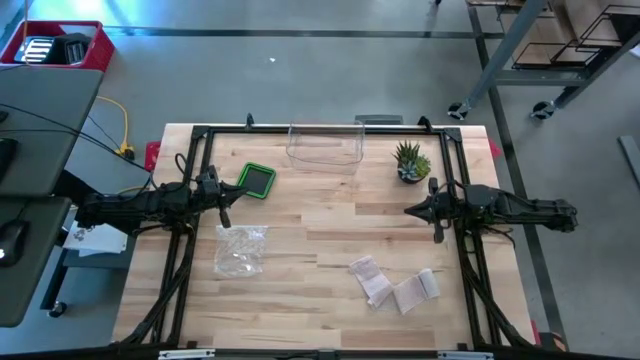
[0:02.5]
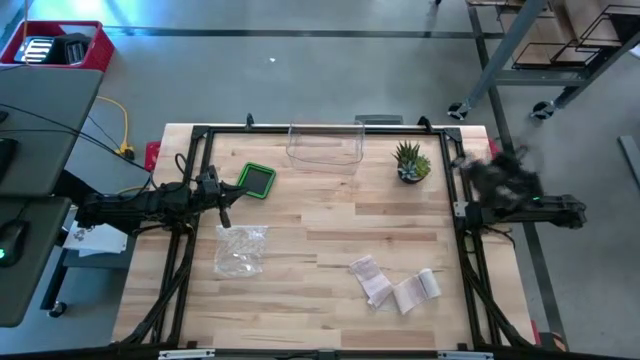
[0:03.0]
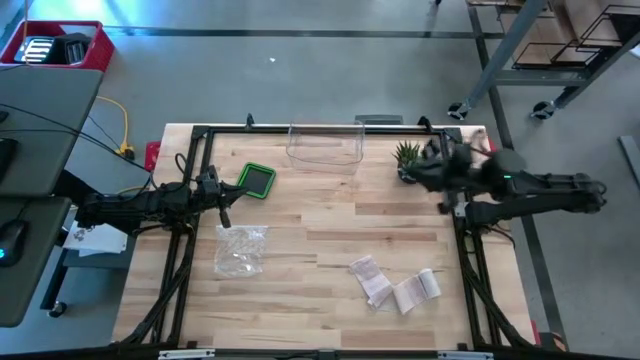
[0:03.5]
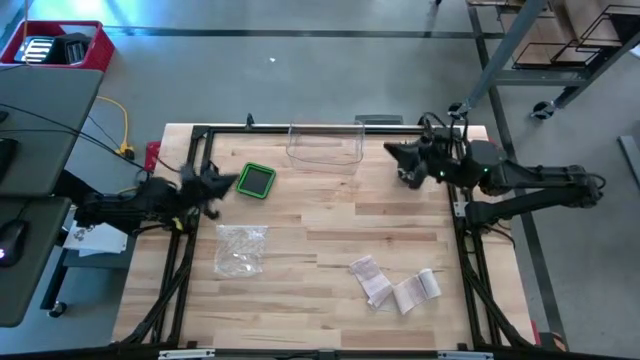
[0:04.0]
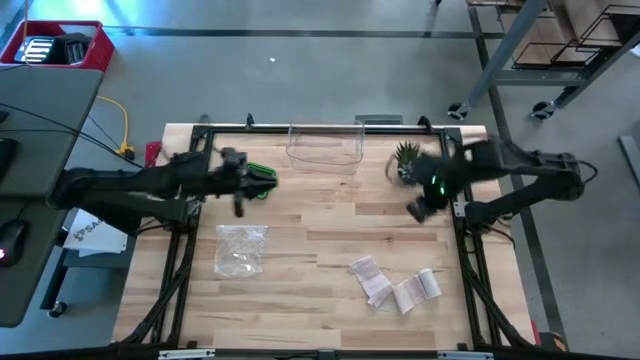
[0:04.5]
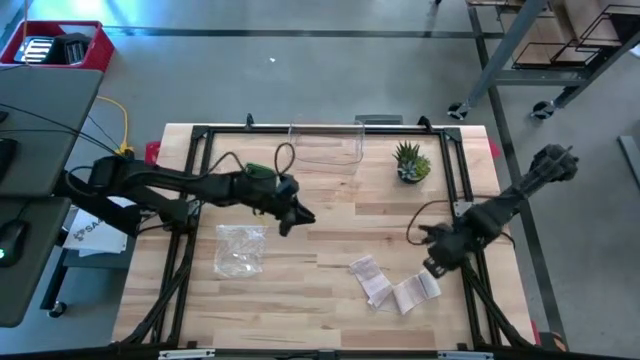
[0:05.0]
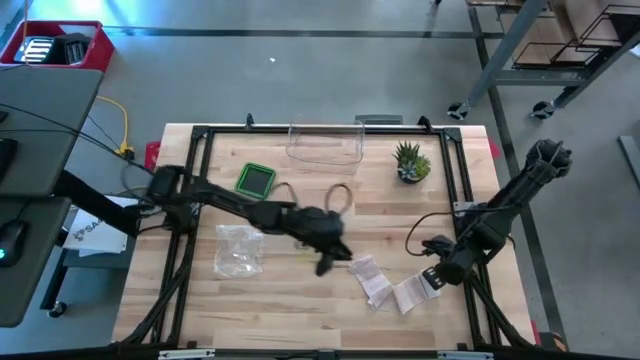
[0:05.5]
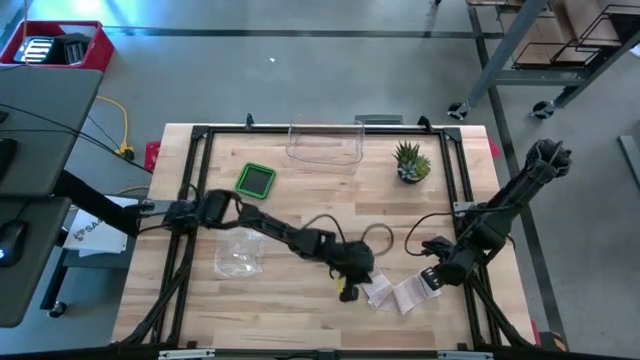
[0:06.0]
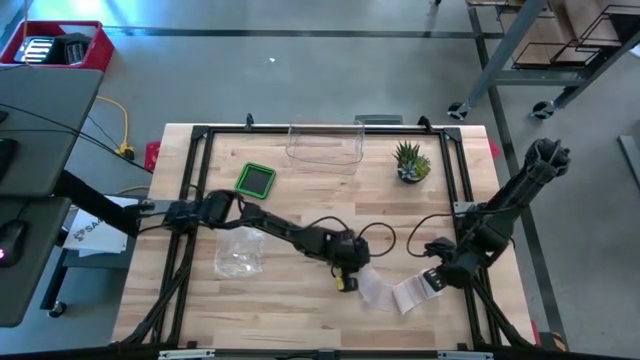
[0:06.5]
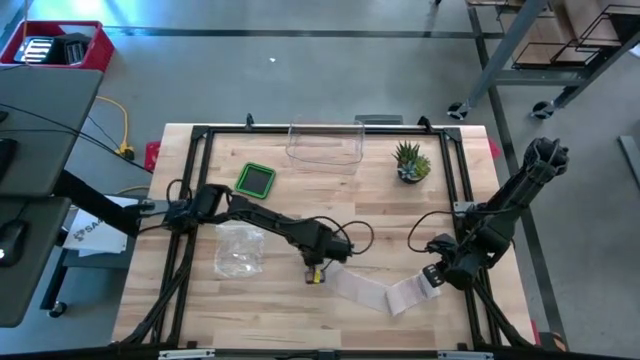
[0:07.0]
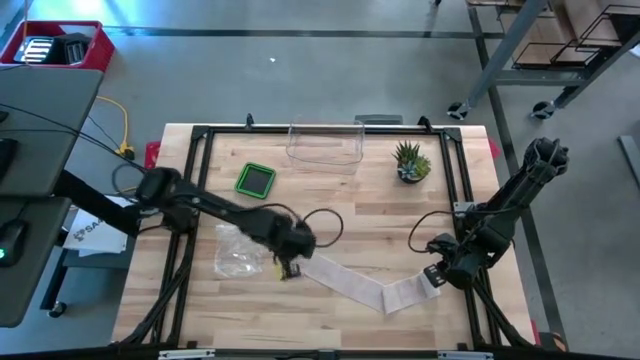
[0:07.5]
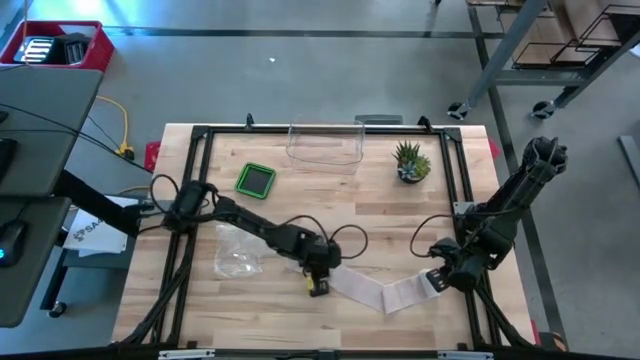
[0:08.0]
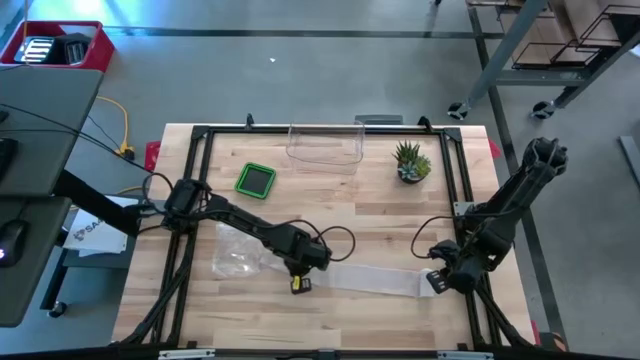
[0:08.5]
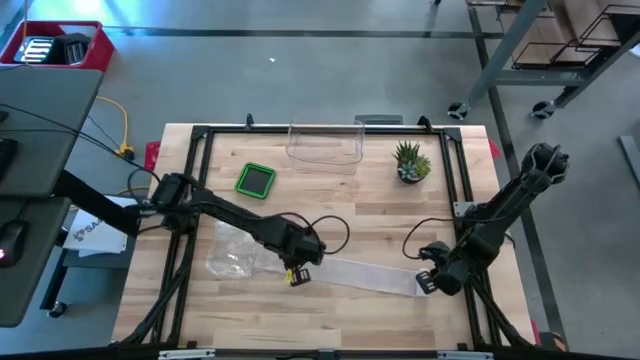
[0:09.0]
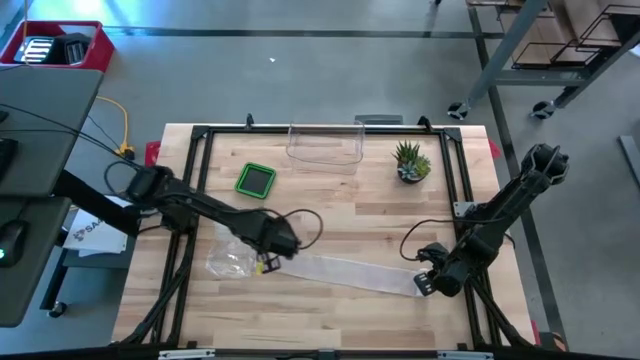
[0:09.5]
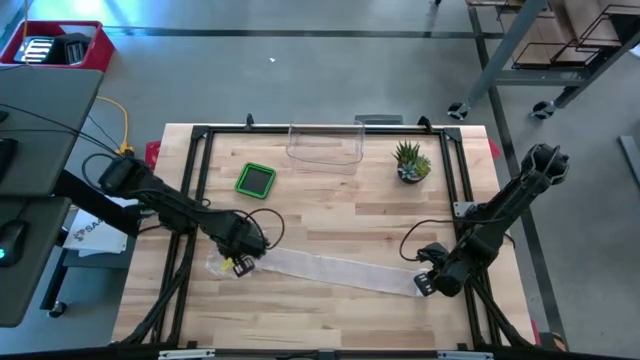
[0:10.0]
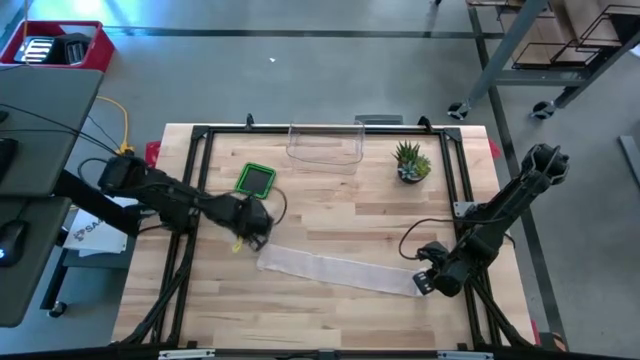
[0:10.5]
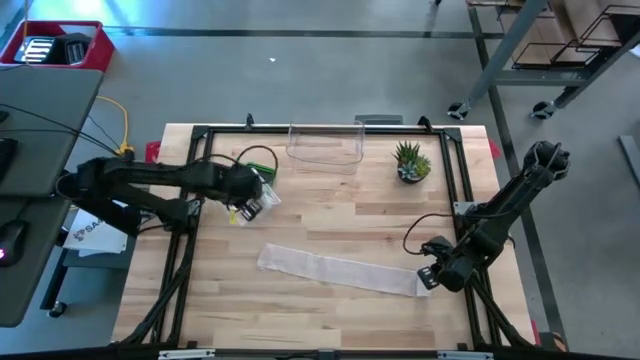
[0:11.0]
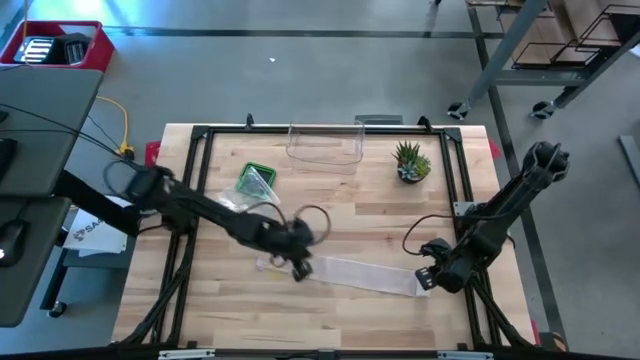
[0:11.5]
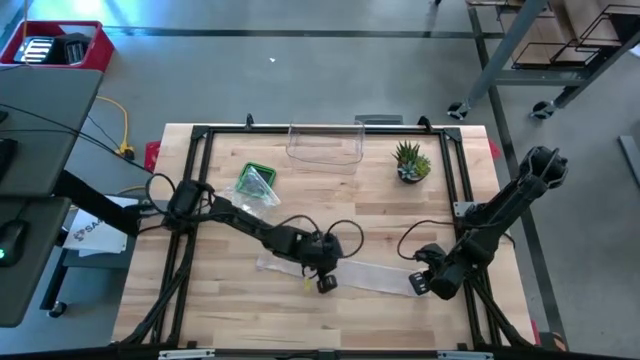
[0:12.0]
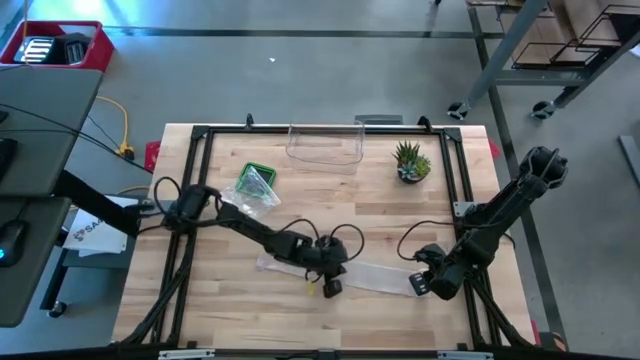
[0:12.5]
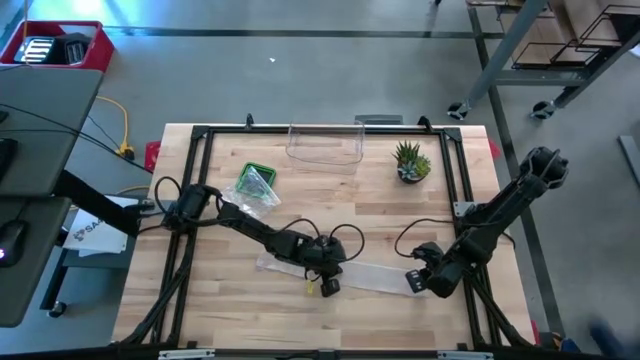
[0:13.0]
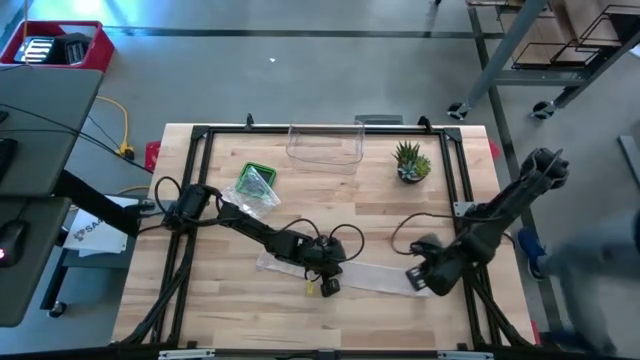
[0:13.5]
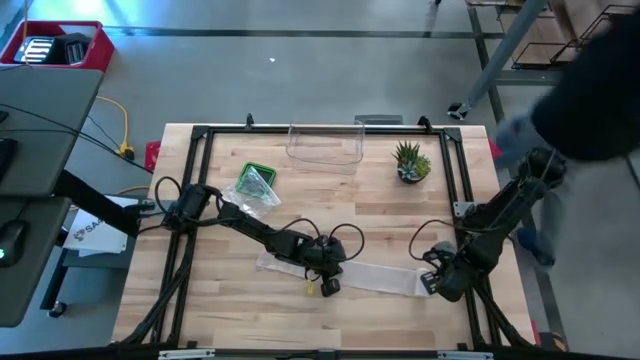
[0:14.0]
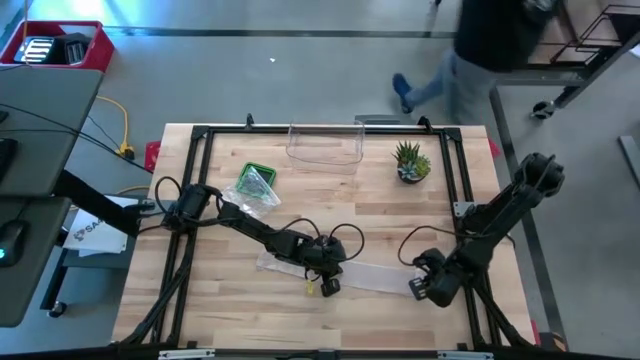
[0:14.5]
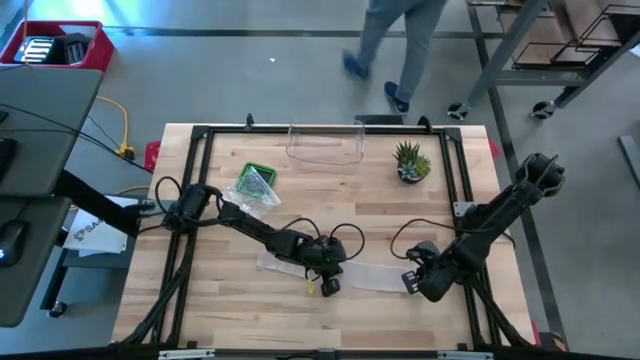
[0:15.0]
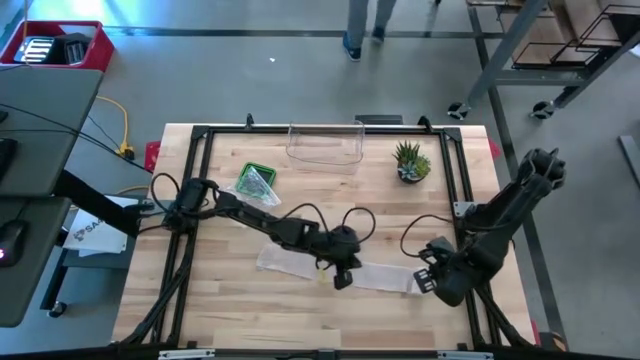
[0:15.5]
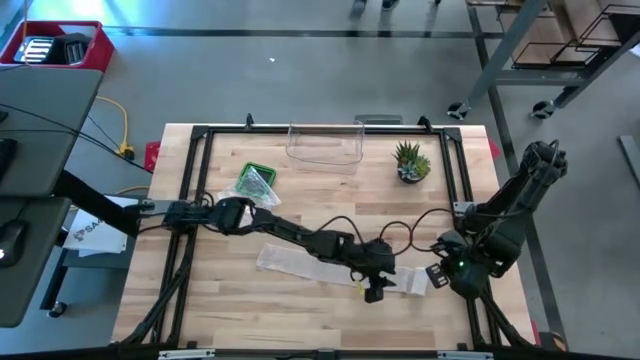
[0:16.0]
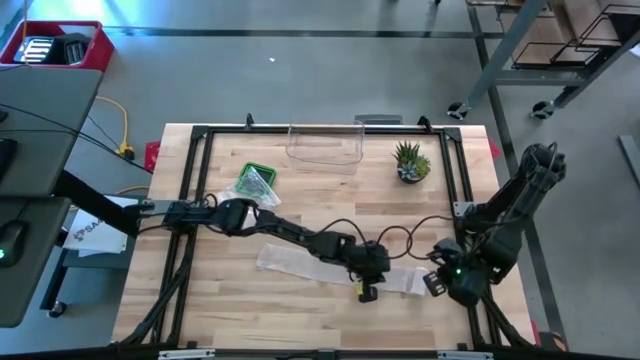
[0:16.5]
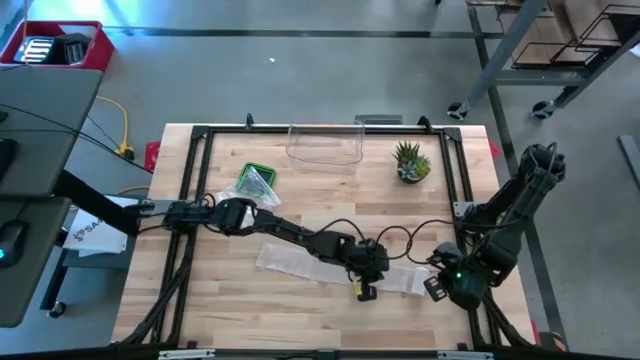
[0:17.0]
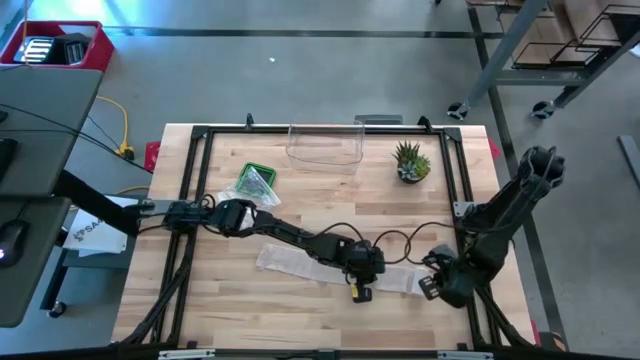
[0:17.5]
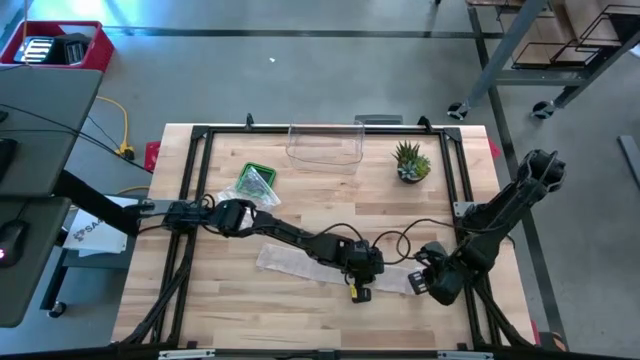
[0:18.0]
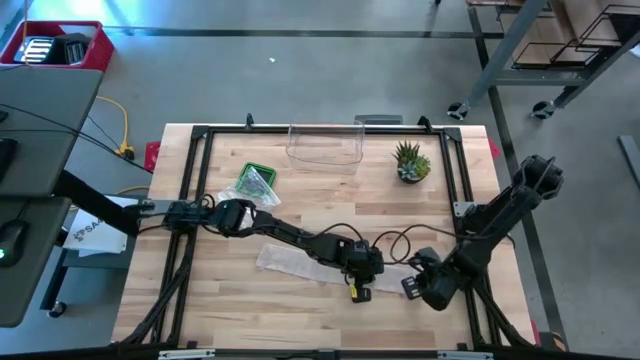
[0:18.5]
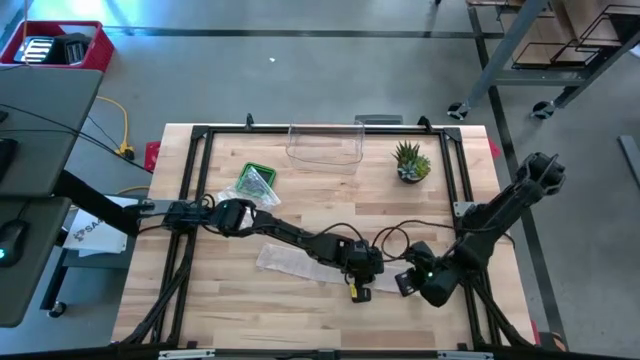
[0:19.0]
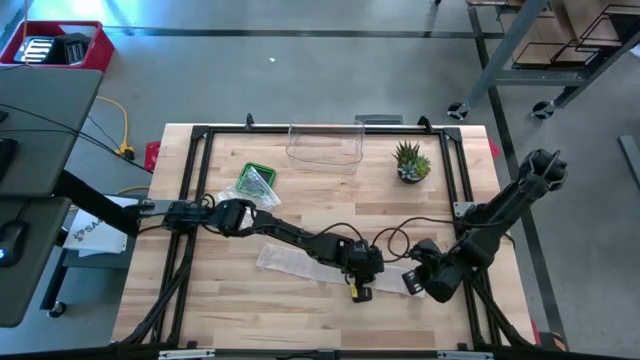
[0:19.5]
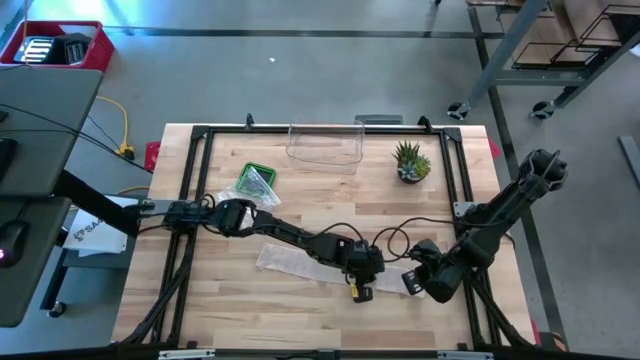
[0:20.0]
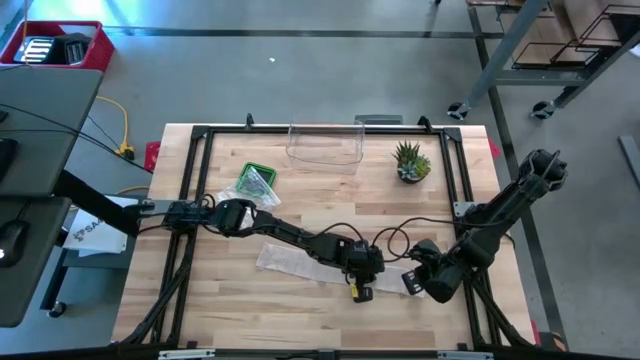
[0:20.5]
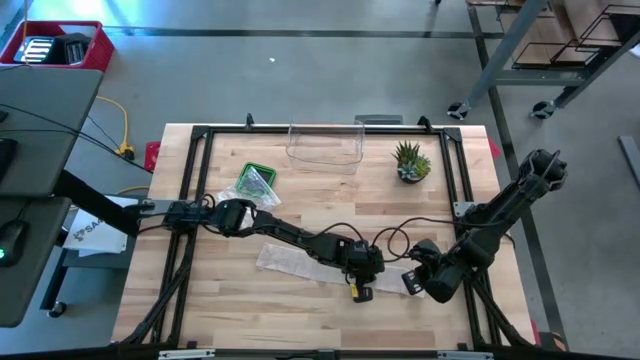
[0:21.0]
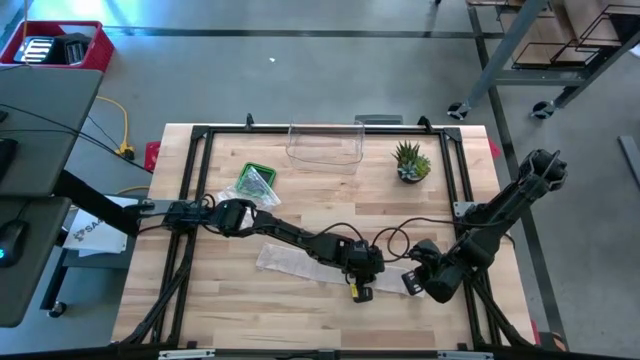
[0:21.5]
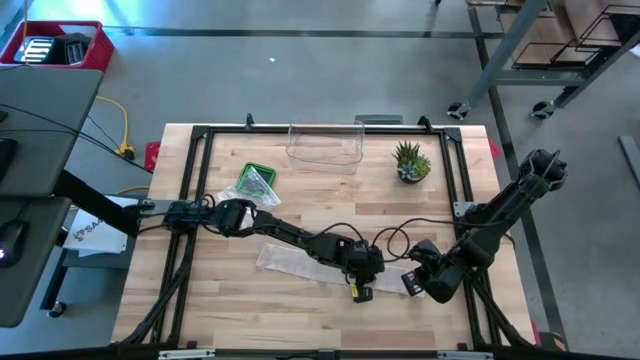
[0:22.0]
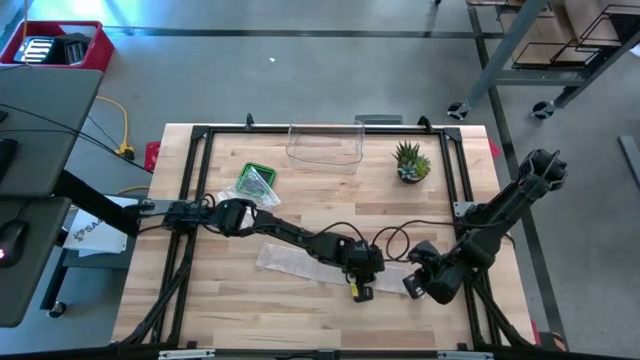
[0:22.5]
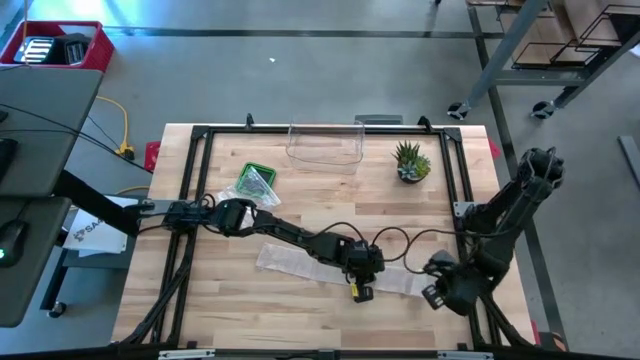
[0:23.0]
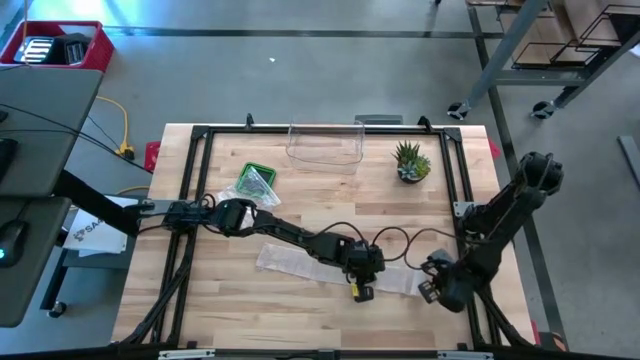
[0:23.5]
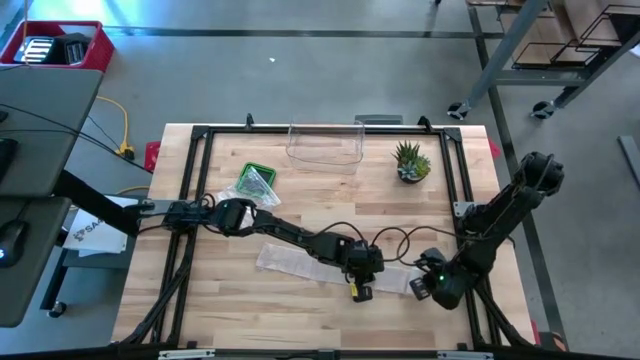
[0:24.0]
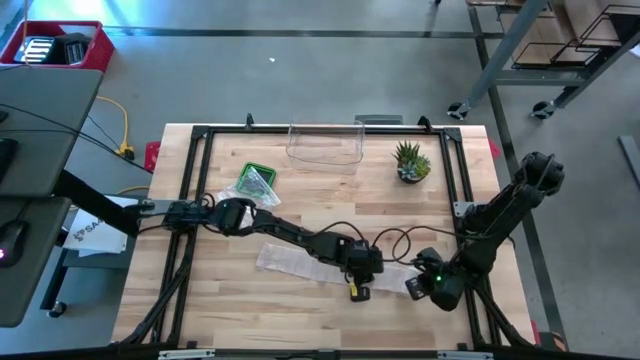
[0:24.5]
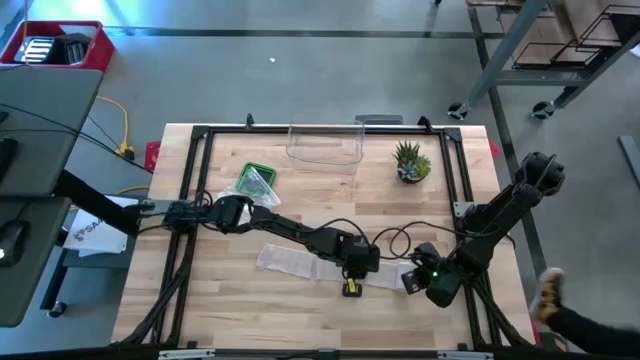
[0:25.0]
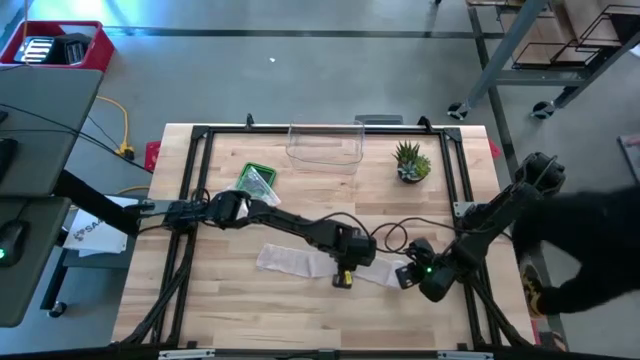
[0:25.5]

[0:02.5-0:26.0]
Task: Roll bandage
Roll the bandage
